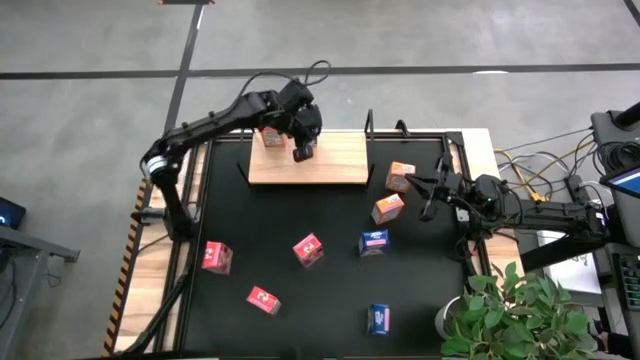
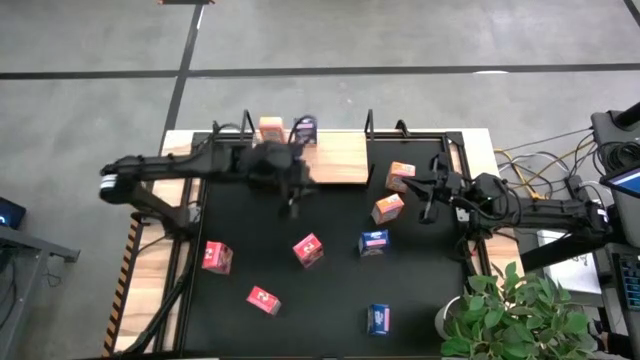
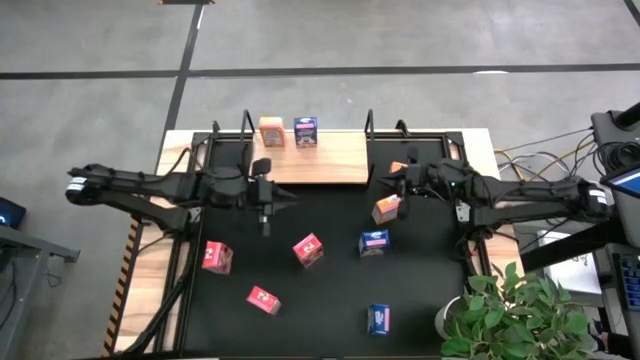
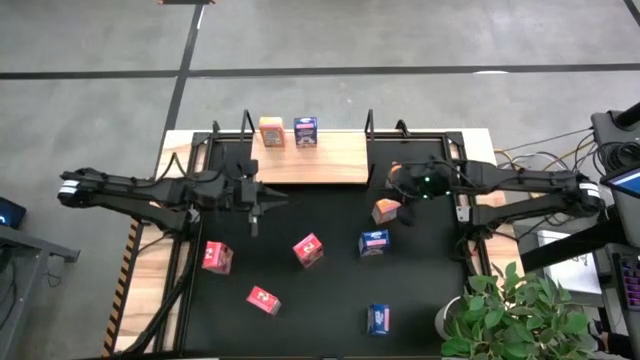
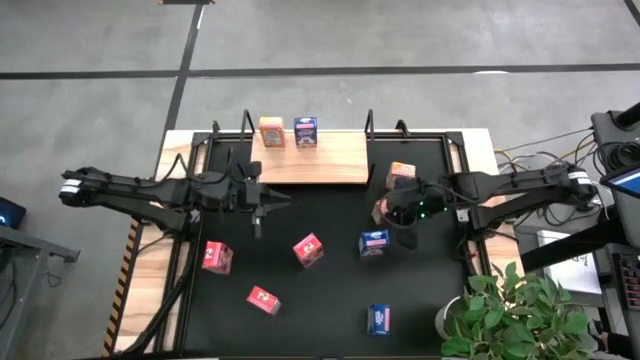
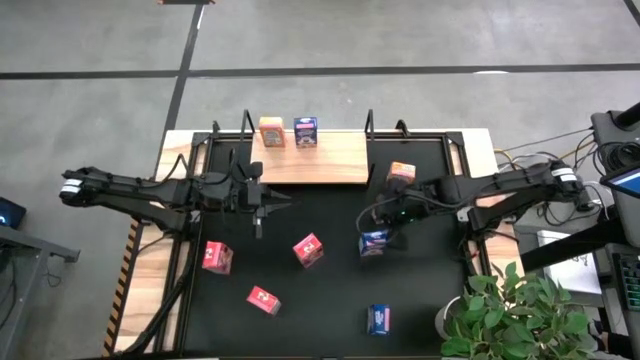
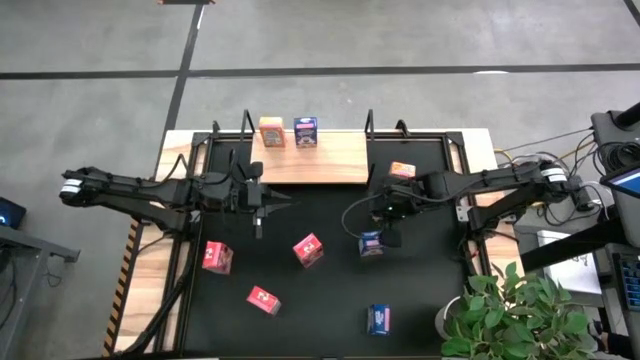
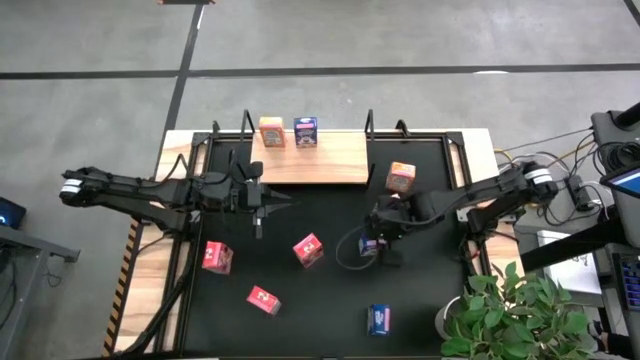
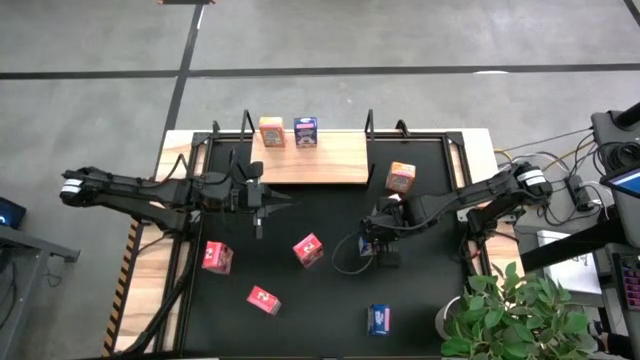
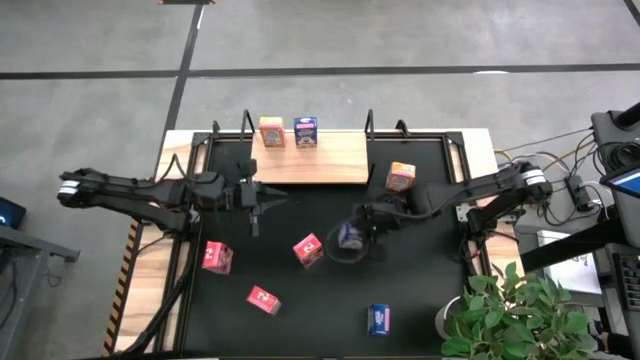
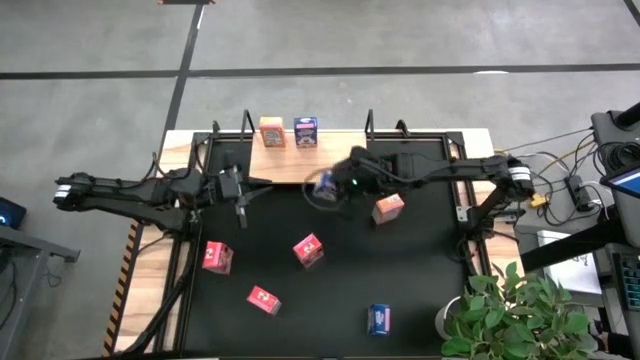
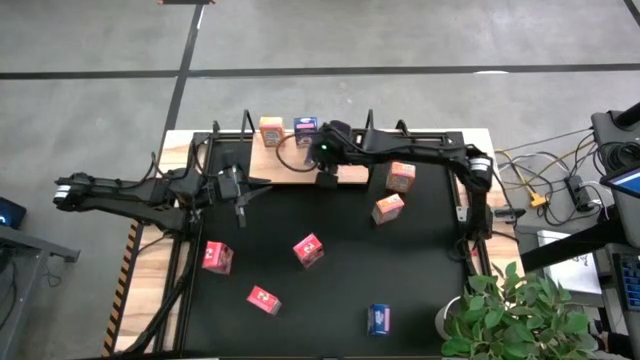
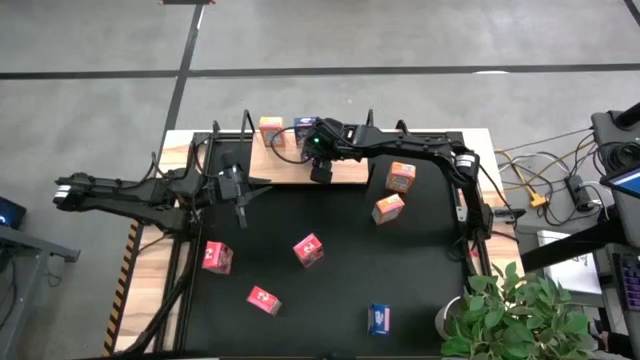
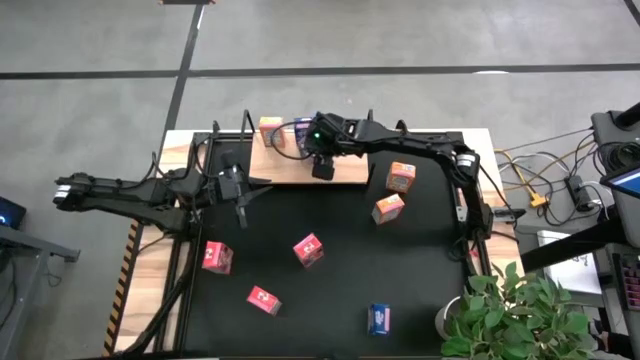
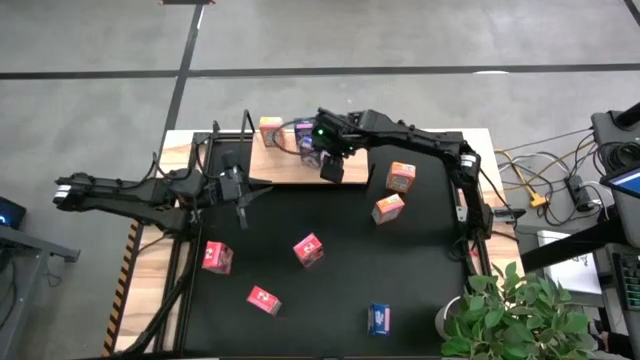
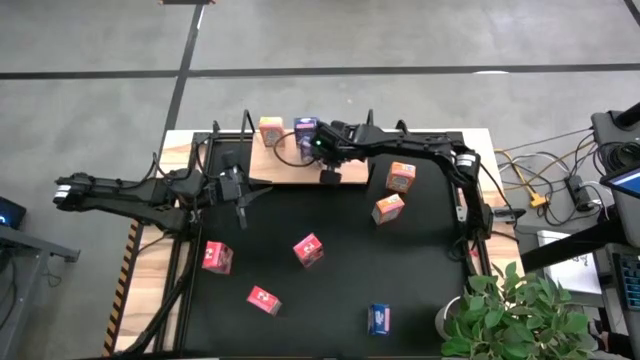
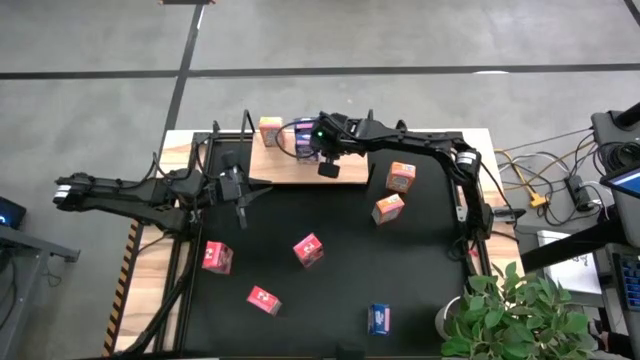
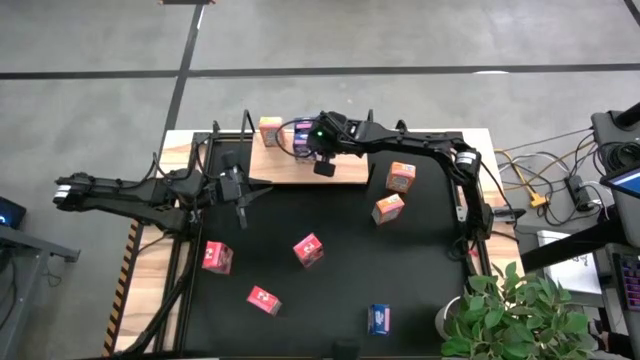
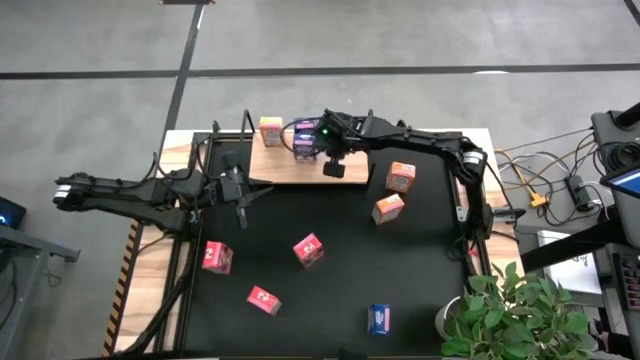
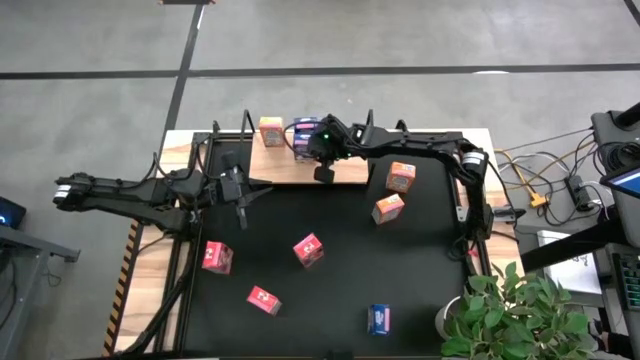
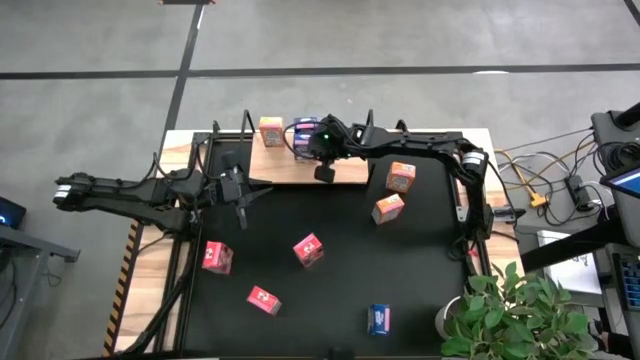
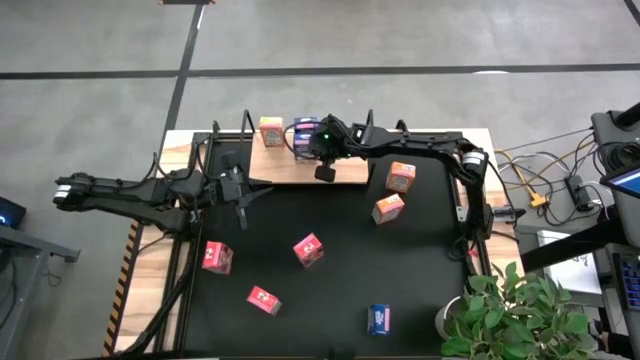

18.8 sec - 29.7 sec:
Task: Stack cereal on shelf
Put the top blue cereal box on the shelf aligned with other blue cereal box

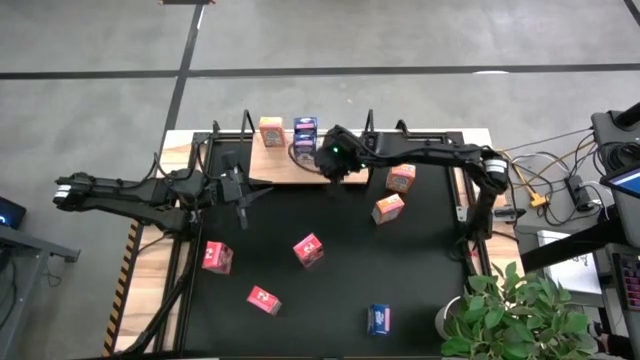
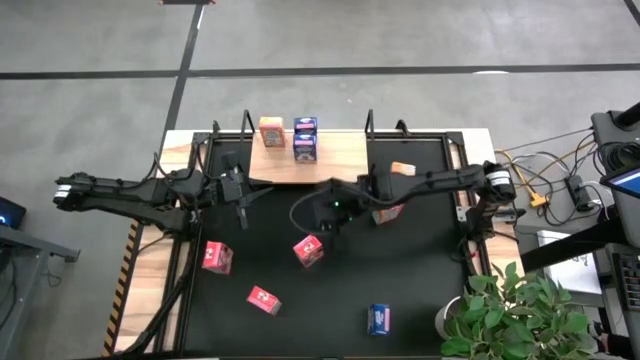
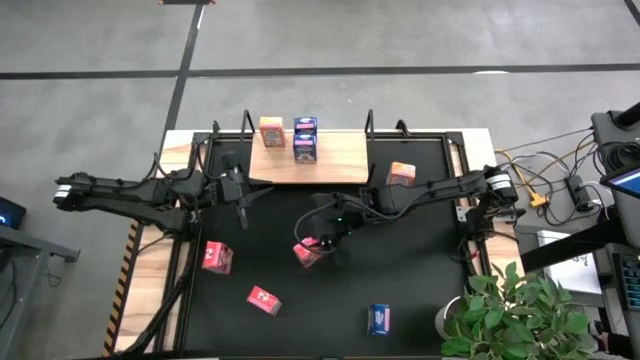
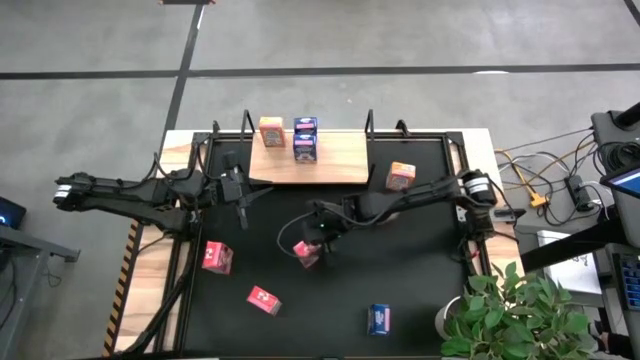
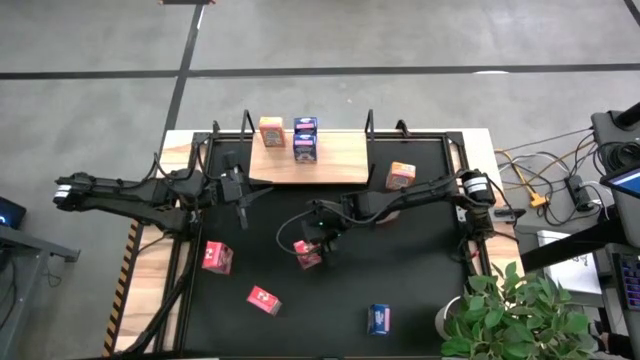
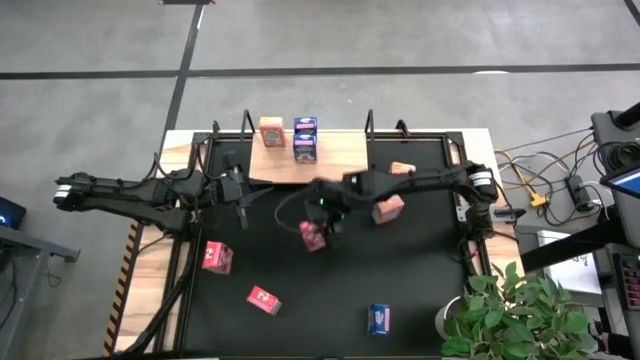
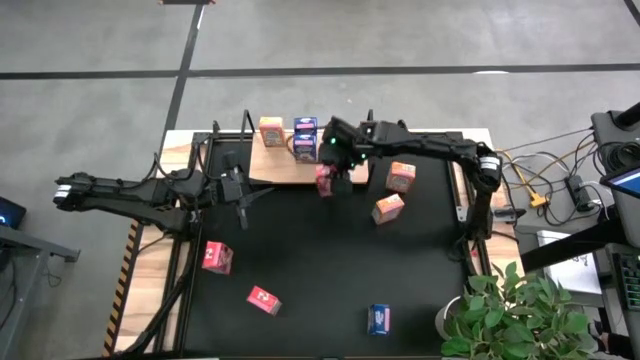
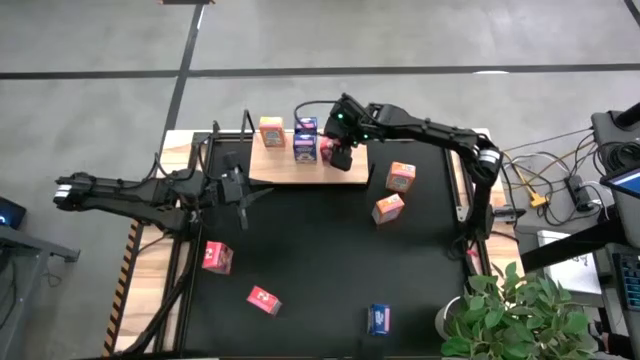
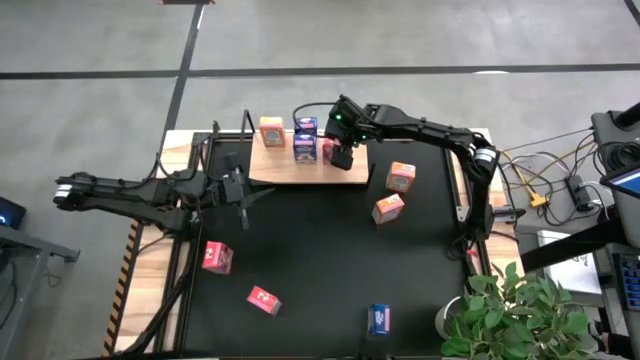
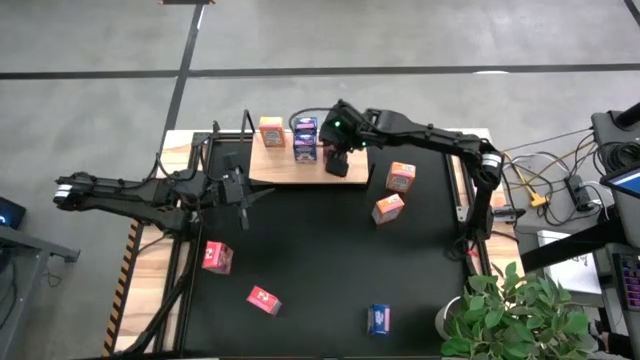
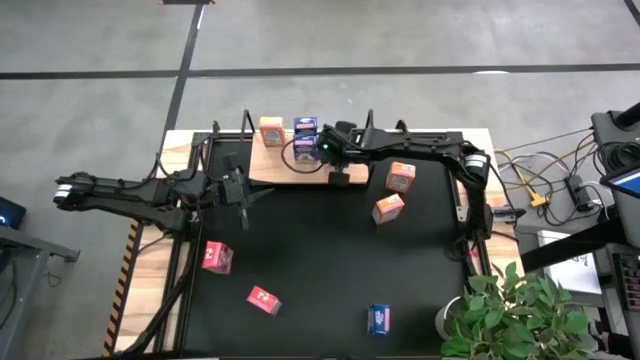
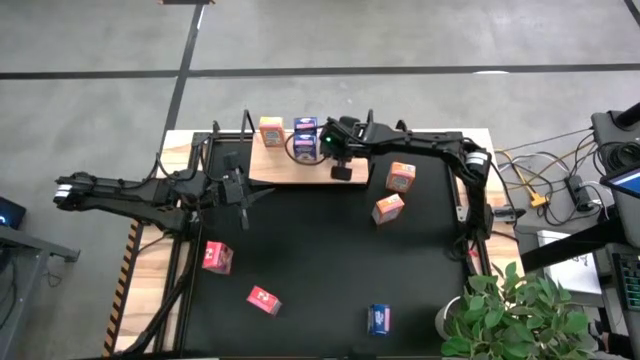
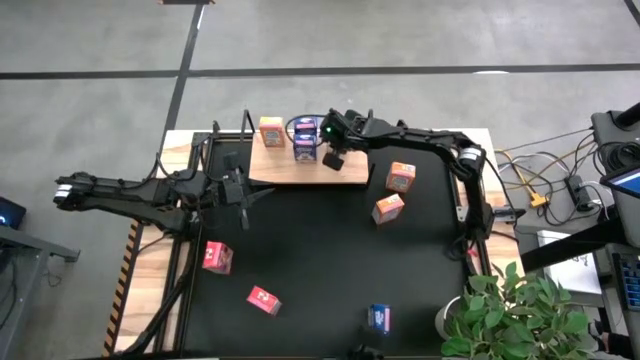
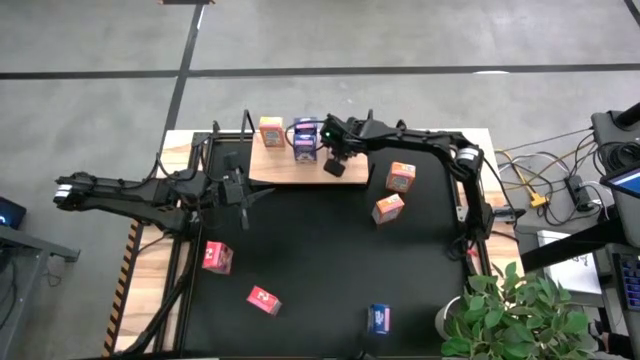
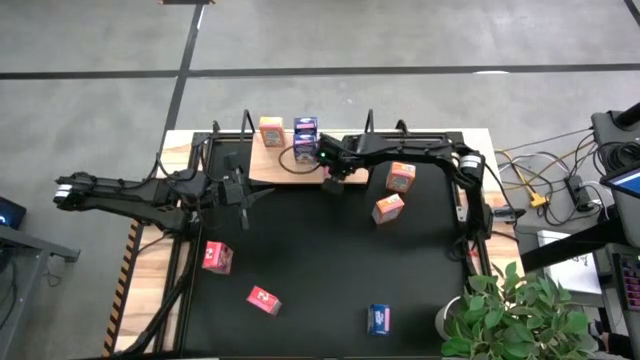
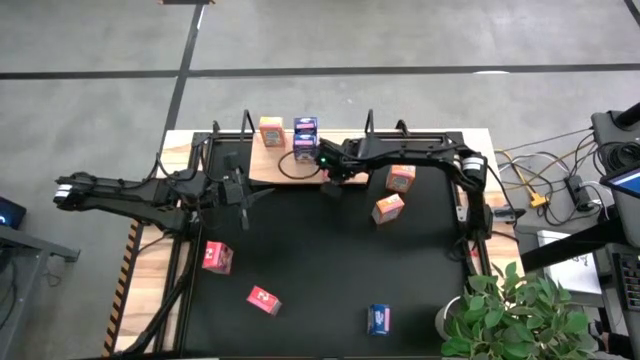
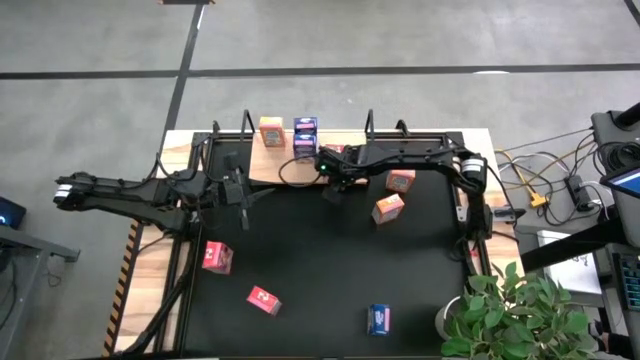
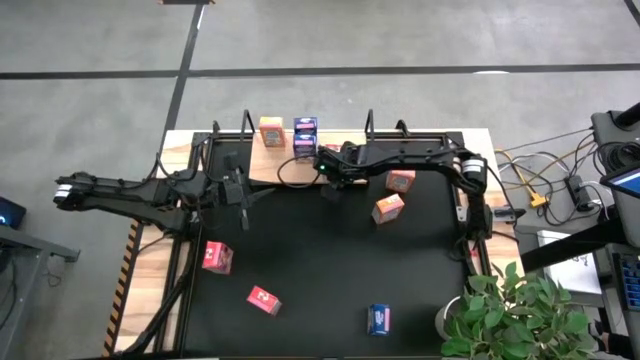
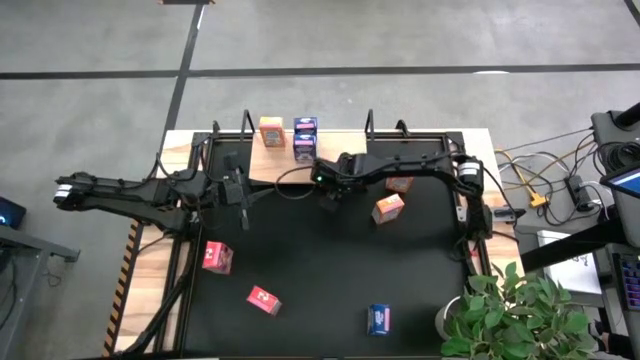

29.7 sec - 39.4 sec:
Put the top right red cereal box on the shelf

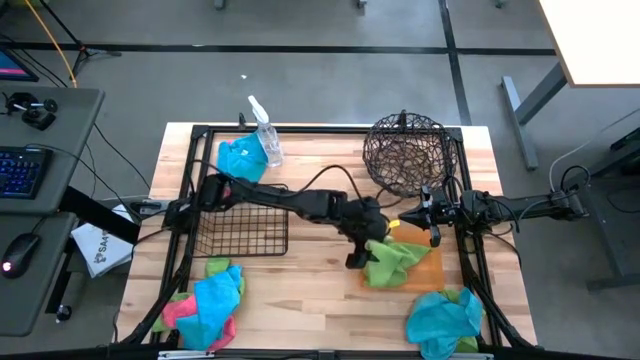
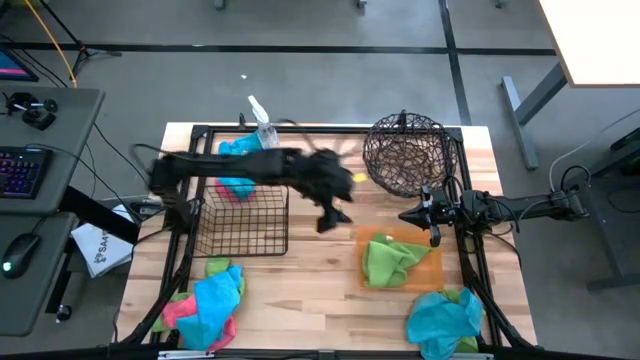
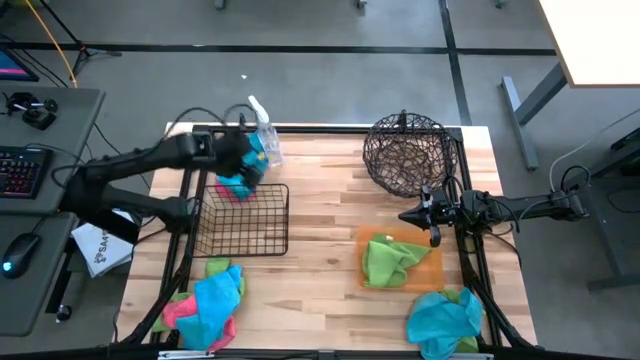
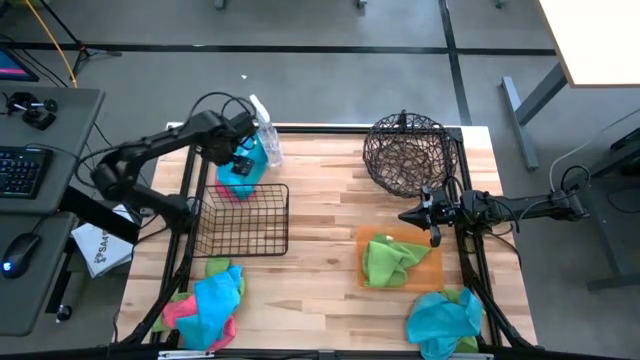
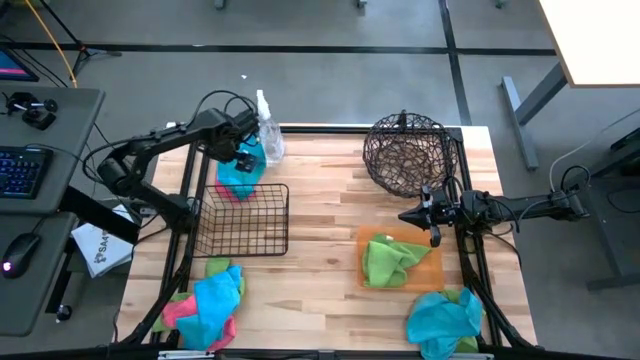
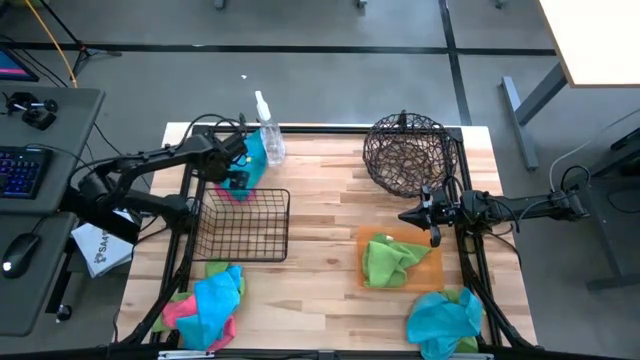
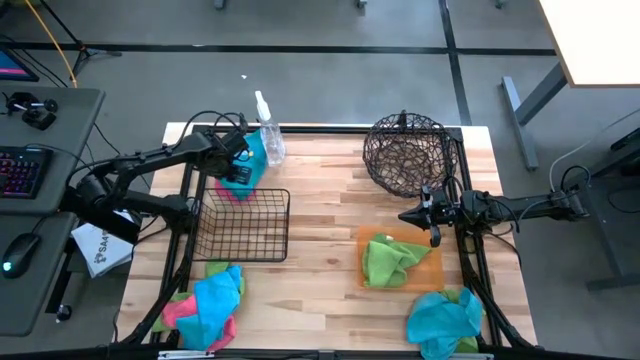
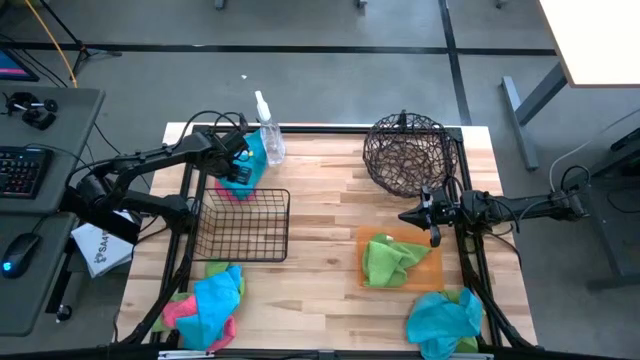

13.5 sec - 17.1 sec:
Task: Sort microfiber towel by color & place in baskets
Put the top blue microfiber towel into the left wire basket
